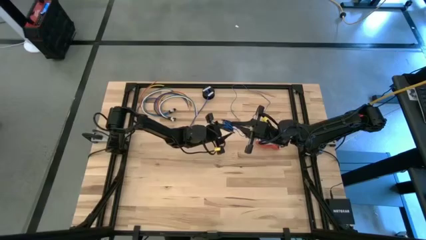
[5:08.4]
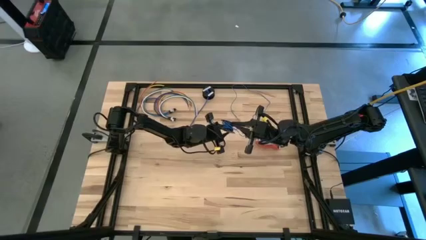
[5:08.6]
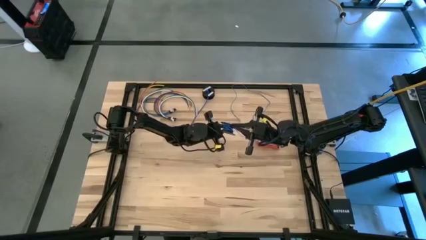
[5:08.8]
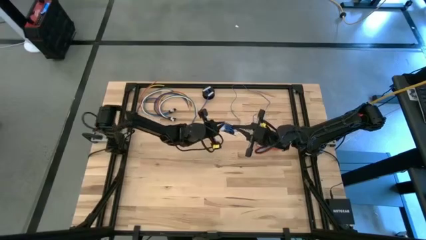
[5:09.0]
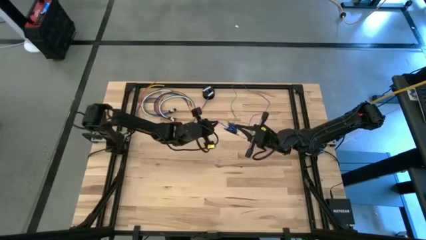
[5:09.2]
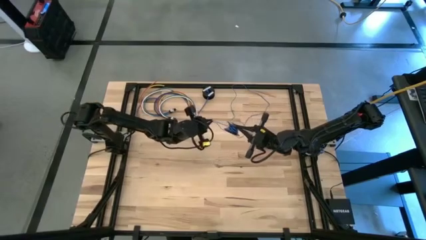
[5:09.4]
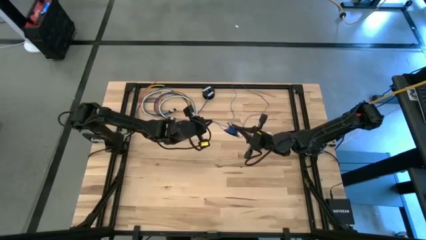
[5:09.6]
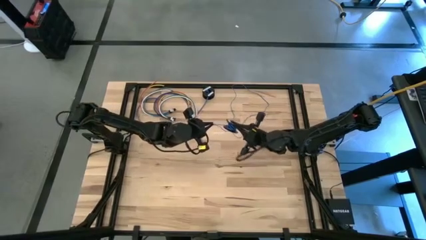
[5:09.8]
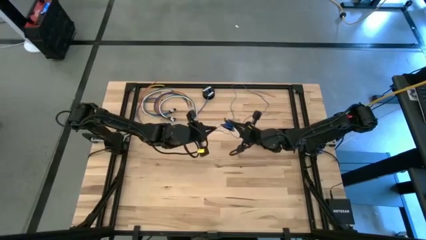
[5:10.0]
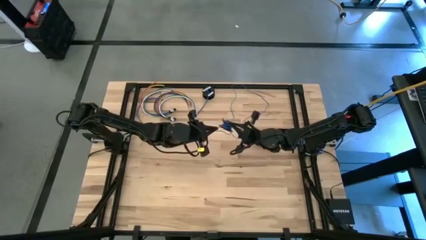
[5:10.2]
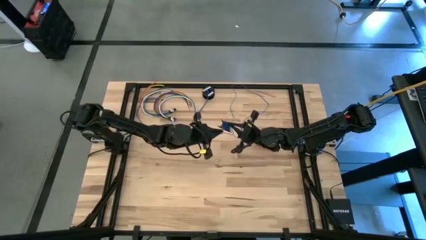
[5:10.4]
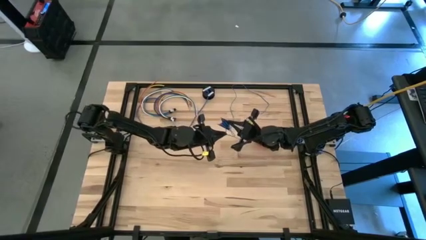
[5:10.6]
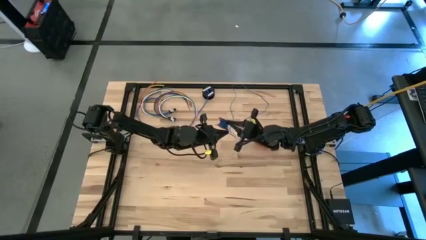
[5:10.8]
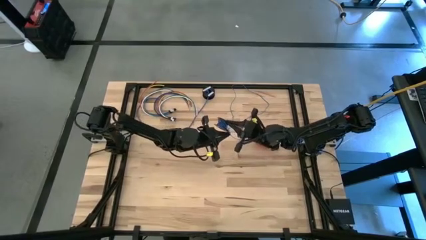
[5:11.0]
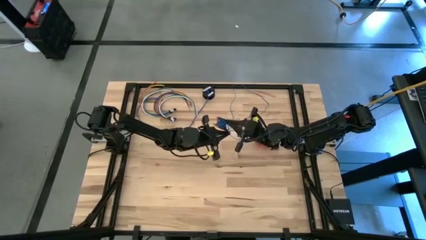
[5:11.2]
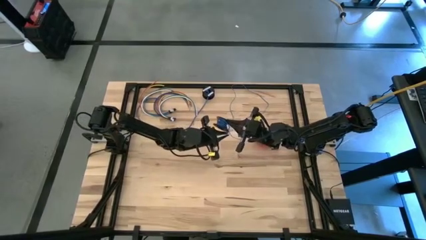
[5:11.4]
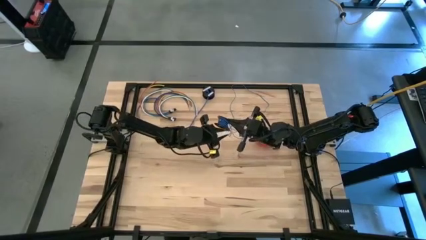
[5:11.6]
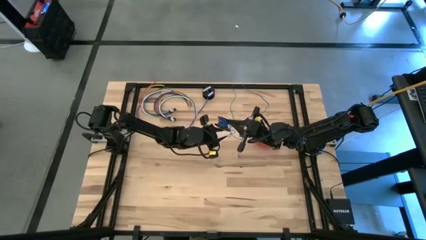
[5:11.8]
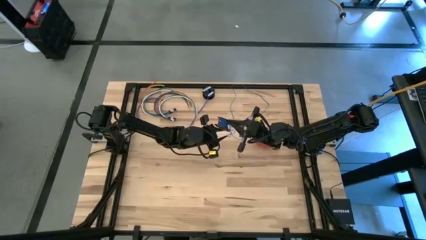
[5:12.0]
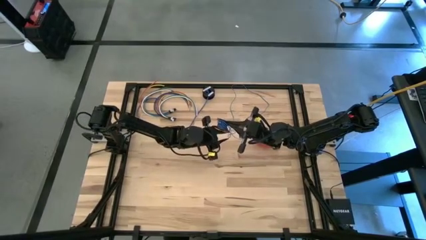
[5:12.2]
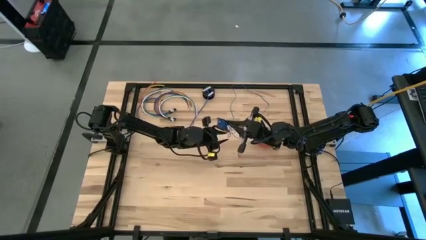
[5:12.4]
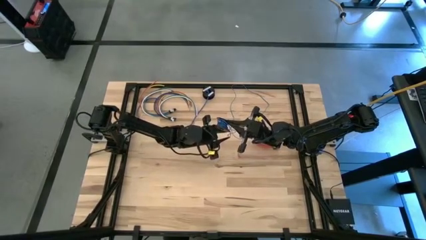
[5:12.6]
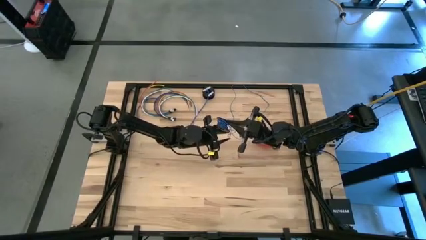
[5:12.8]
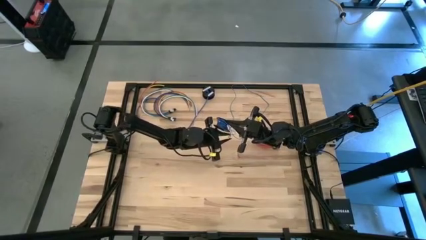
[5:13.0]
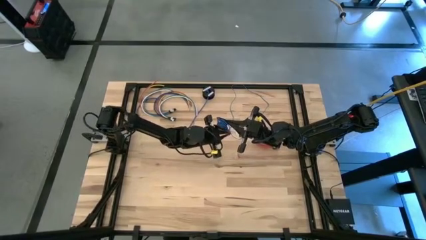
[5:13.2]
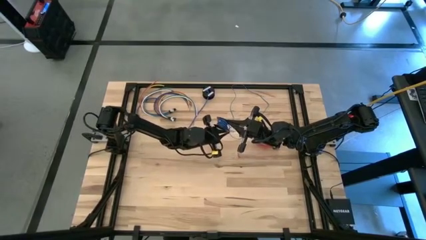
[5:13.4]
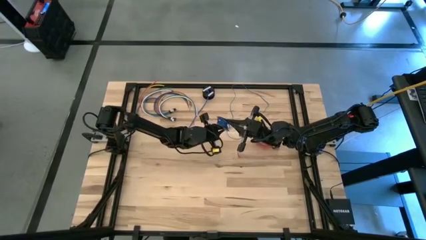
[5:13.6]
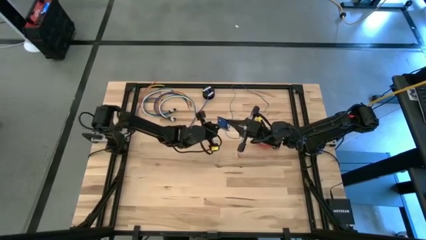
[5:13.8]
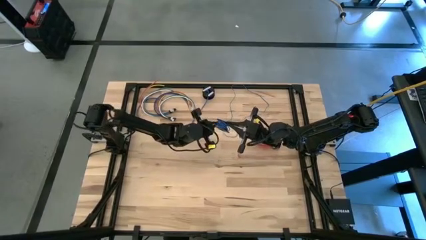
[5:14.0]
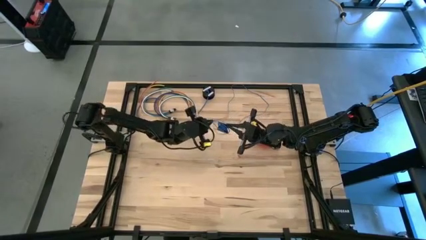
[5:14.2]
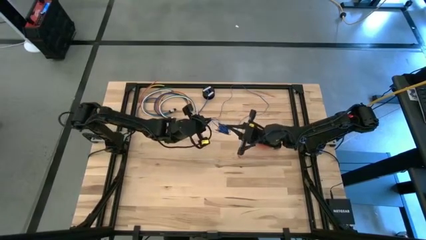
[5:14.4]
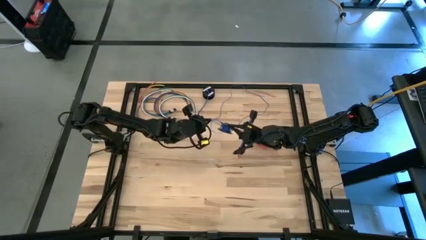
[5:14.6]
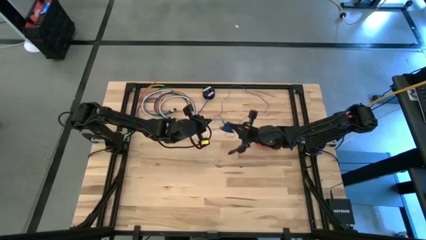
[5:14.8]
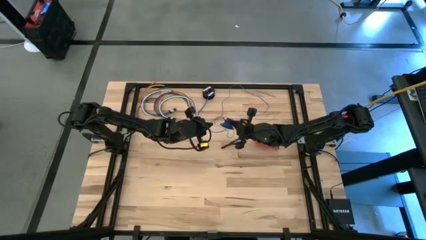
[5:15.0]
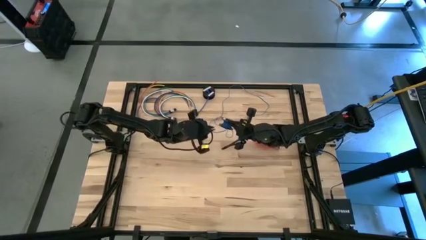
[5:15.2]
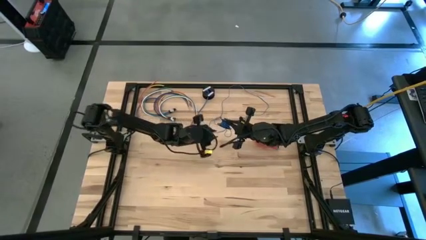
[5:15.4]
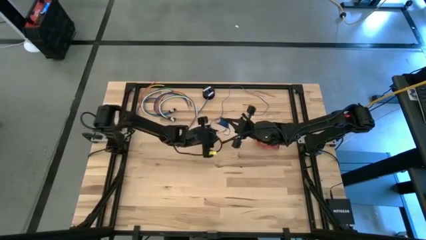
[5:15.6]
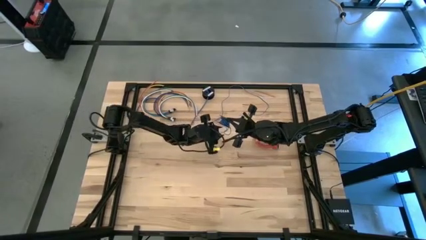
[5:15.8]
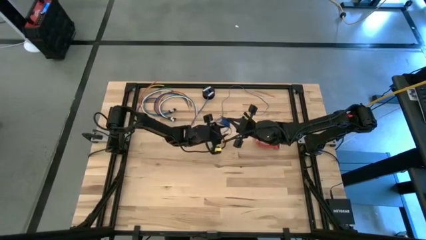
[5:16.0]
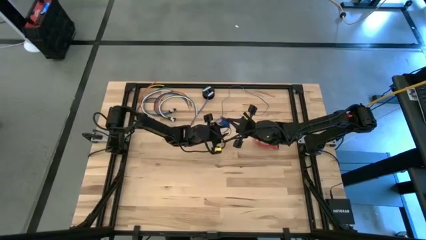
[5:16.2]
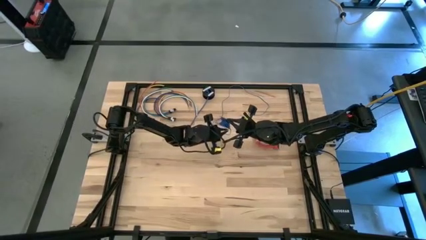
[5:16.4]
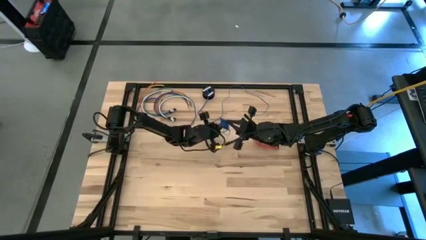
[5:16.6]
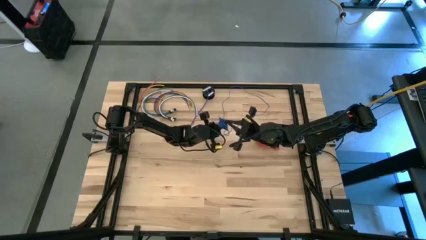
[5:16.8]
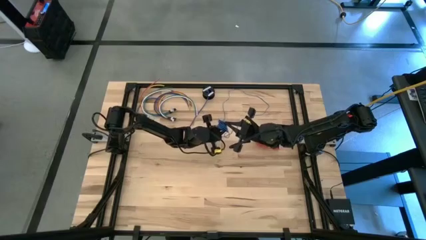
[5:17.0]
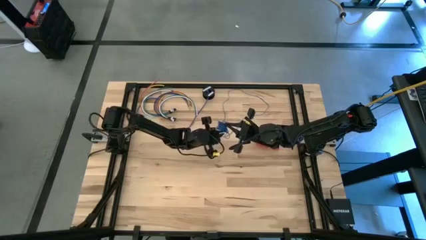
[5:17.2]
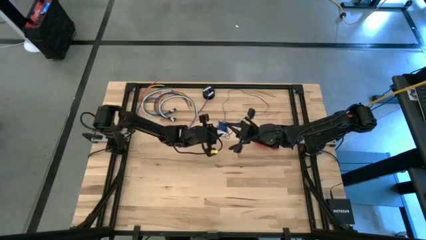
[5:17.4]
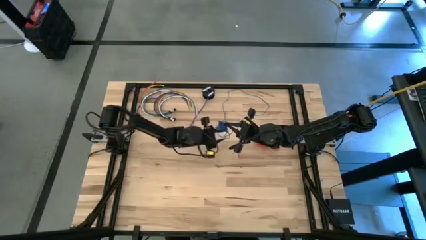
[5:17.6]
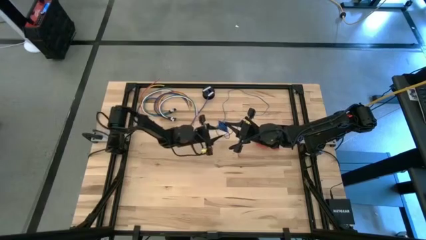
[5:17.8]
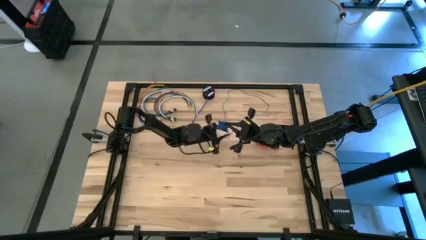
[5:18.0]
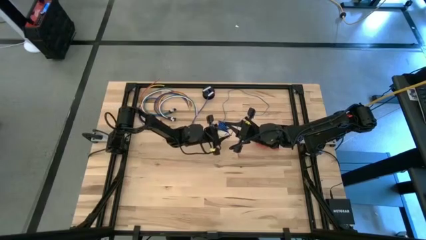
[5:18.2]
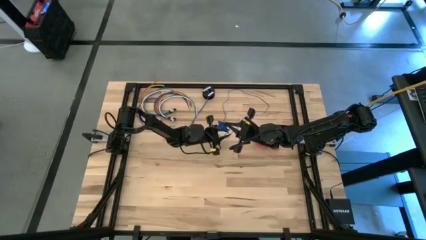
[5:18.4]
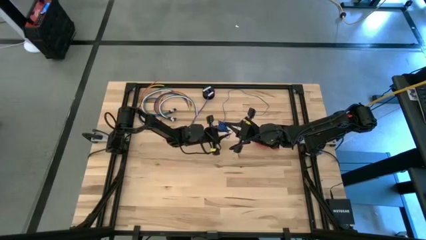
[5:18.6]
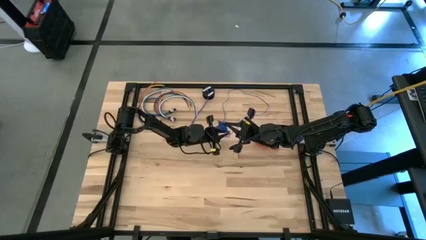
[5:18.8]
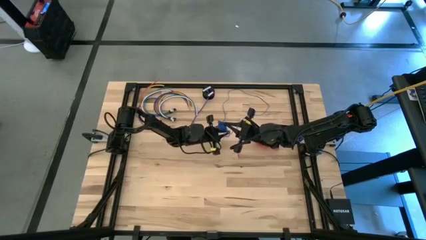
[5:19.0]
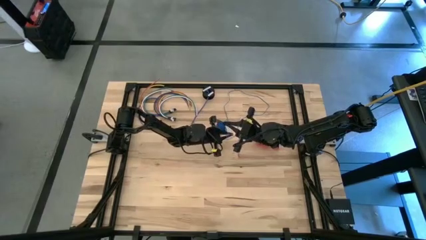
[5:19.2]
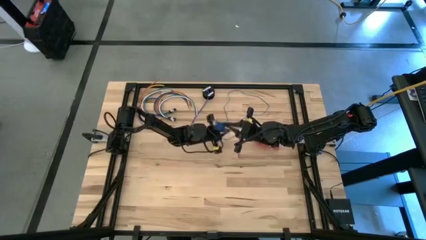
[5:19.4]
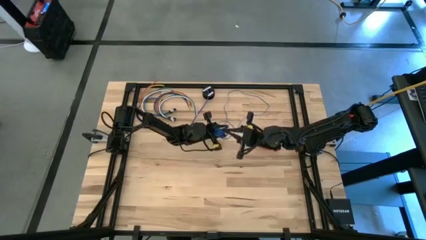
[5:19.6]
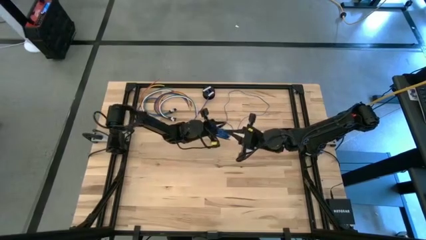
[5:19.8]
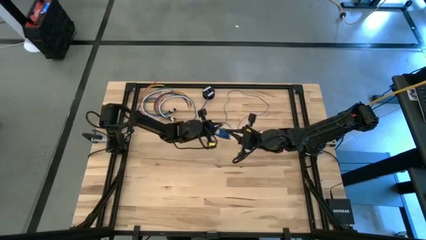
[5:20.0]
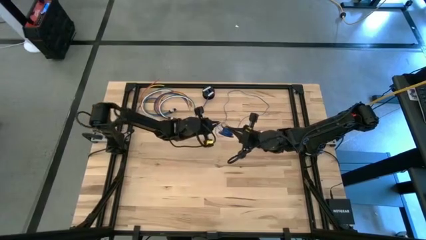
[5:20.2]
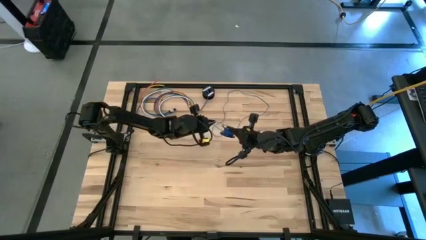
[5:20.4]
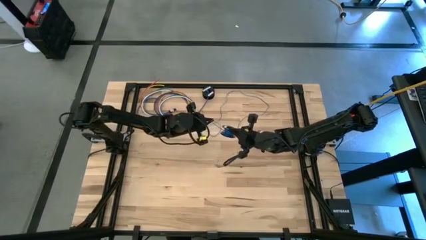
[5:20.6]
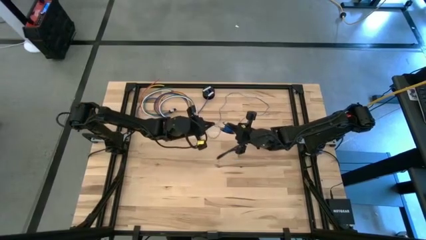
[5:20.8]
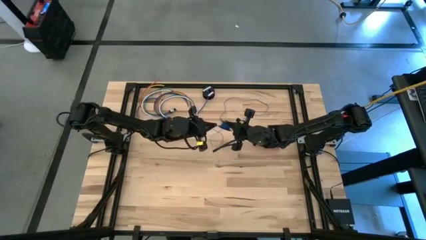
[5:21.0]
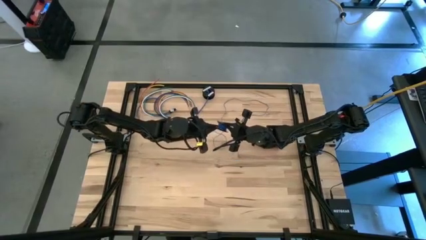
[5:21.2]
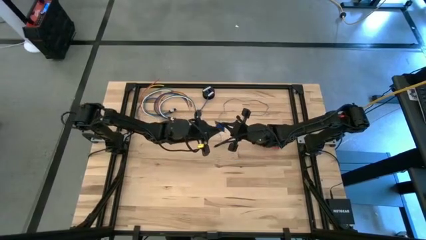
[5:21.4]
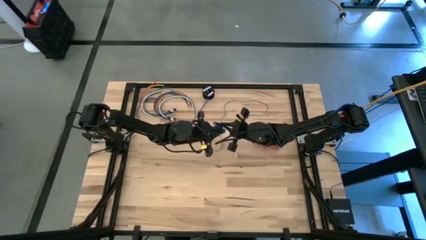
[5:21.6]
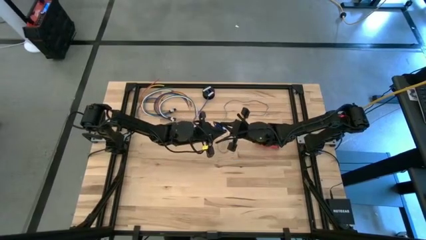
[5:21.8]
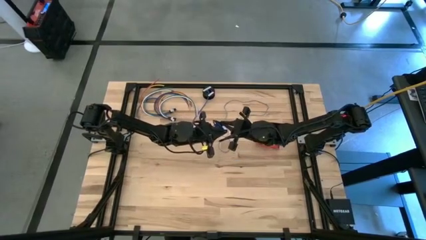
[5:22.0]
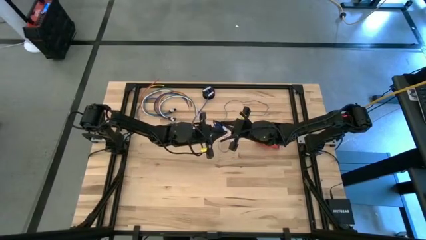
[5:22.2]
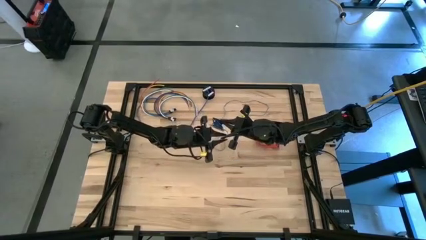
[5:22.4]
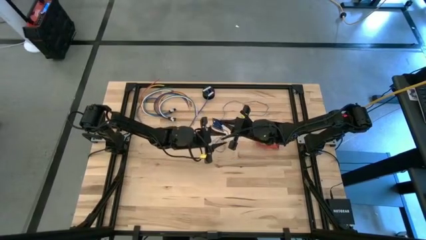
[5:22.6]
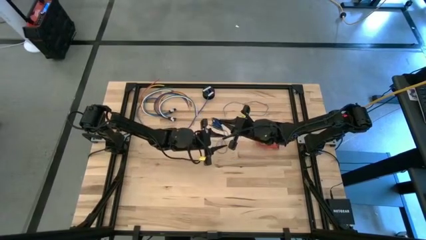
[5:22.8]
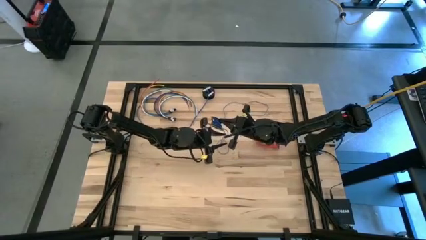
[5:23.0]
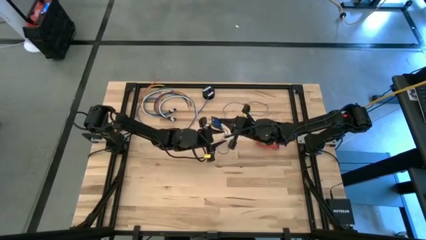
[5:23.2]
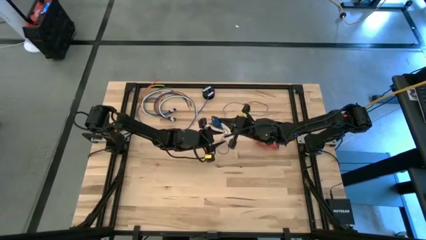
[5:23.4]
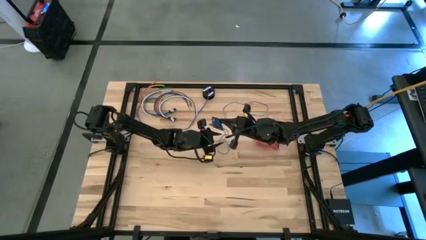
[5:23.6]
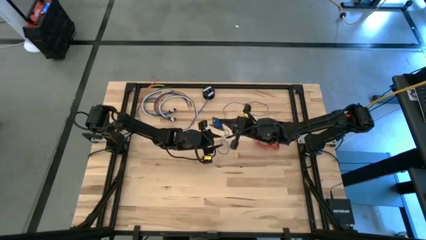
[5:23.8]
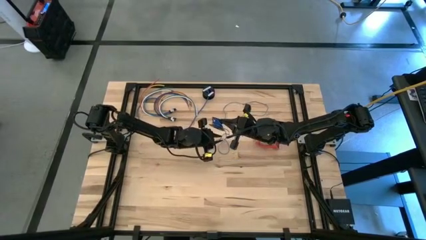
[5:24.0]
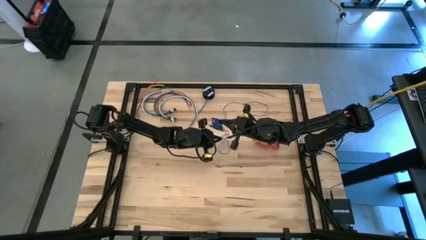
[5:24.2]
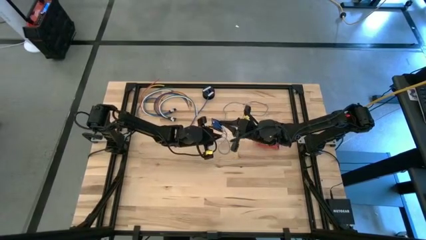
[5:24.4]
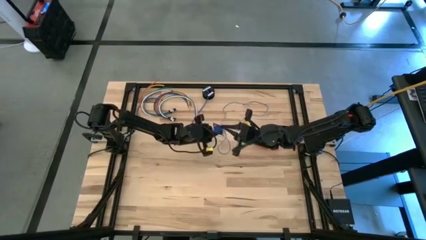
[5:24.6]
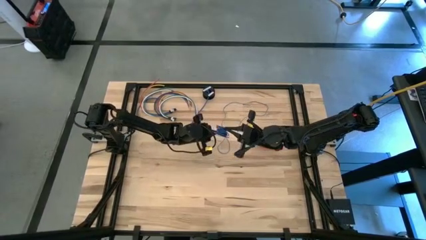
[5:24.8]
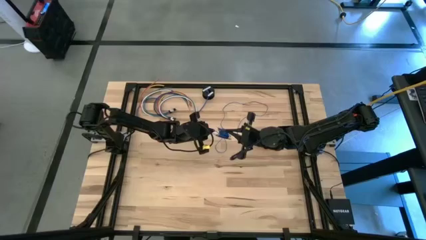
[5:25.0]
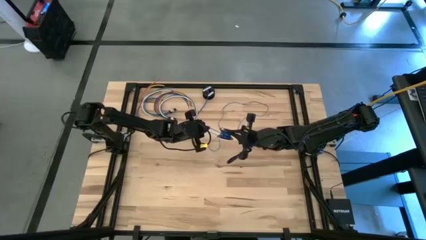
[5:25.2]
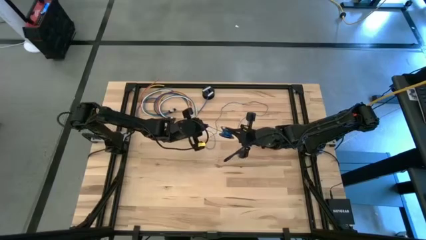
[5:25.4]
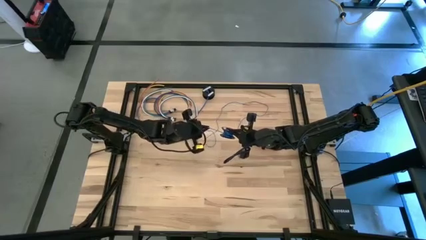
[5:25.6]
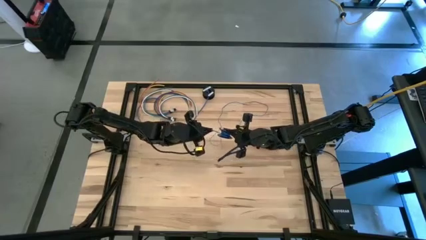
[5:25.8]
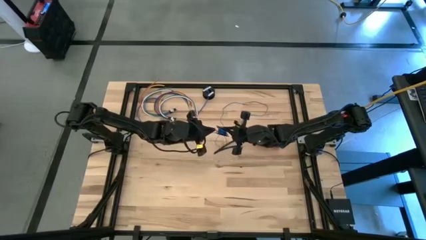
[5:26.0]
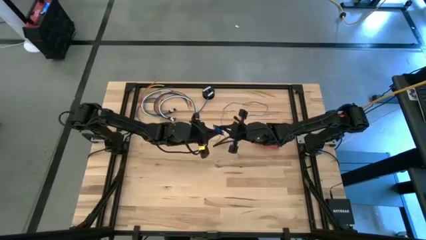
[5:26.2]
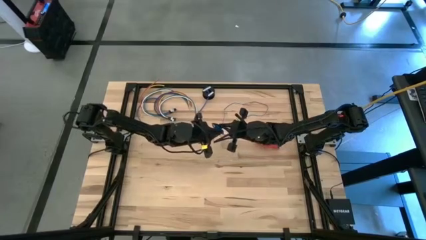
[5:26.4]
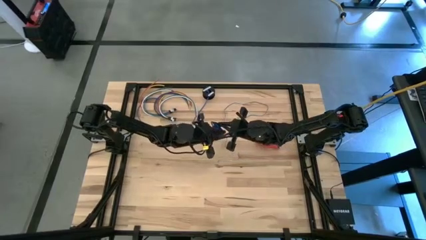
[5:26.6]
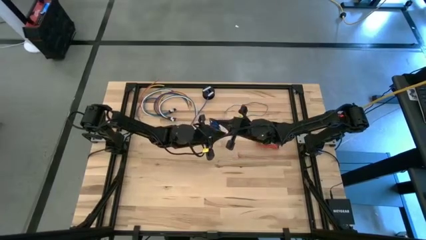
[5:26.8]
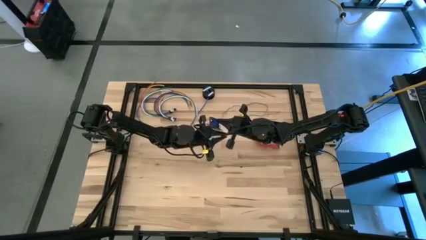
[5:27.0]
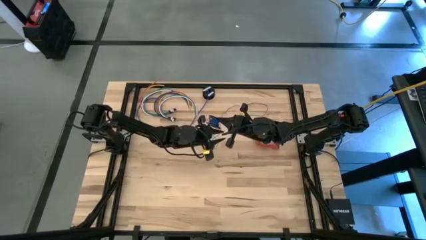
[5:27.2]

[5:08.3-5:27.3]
Task: Coil cords
Coil the blue wire onto the spool
